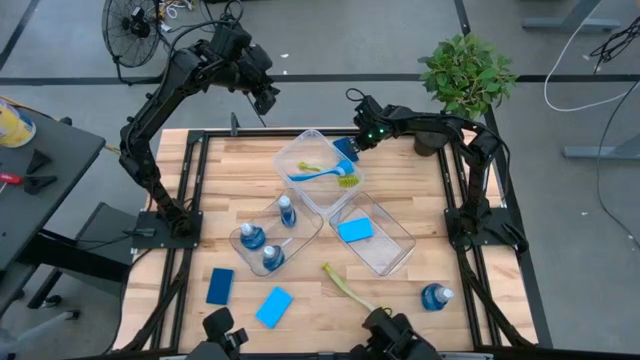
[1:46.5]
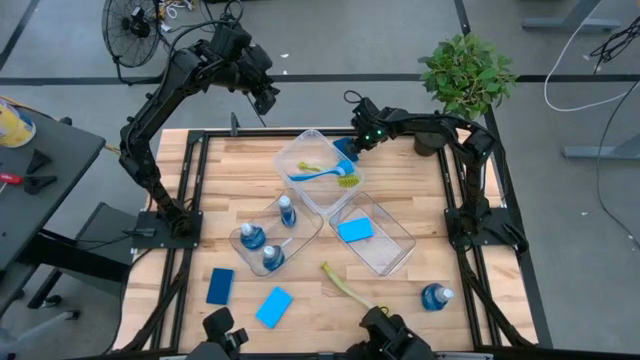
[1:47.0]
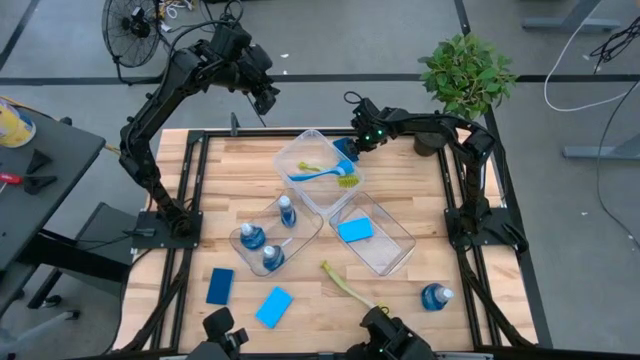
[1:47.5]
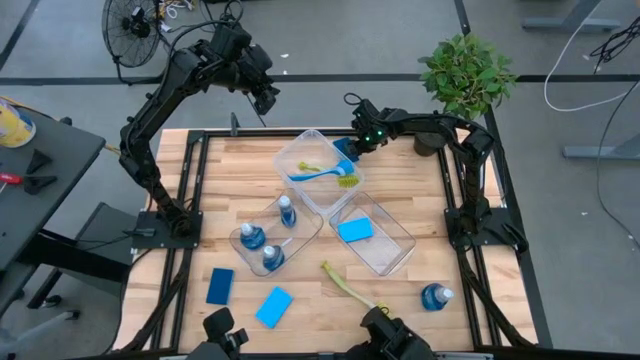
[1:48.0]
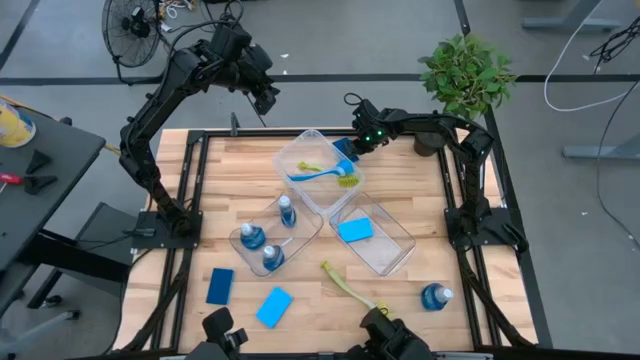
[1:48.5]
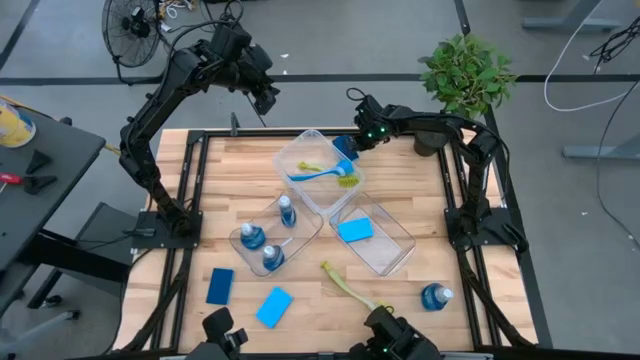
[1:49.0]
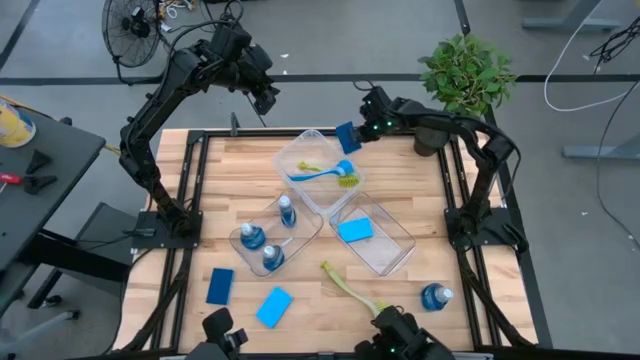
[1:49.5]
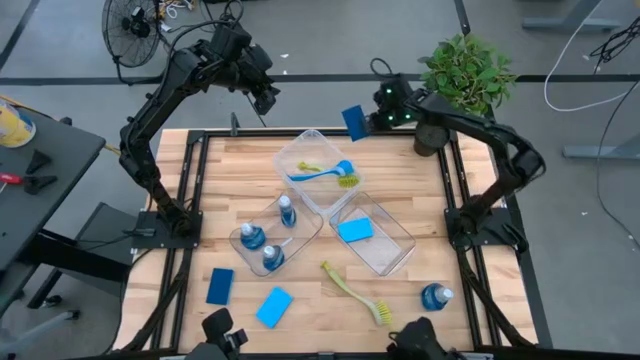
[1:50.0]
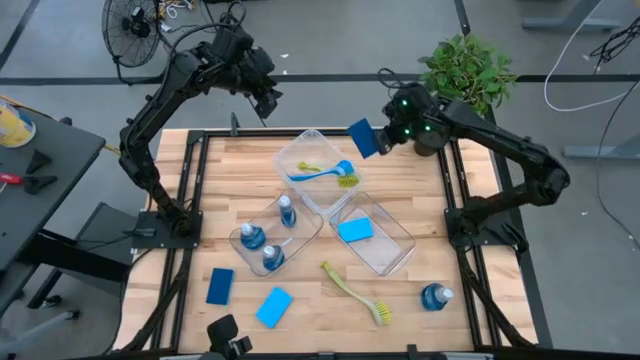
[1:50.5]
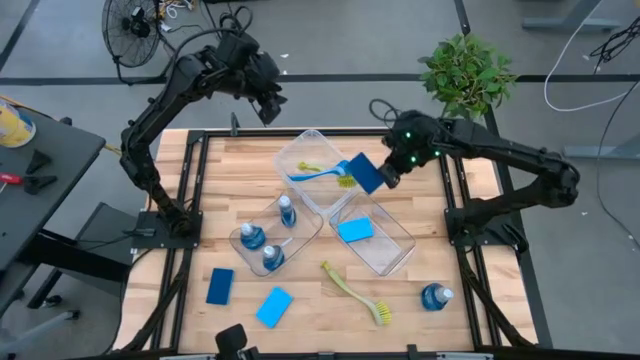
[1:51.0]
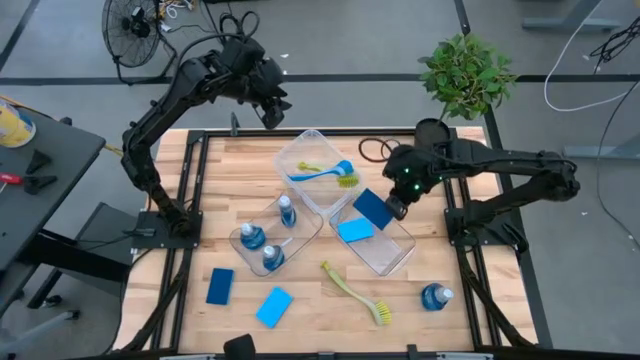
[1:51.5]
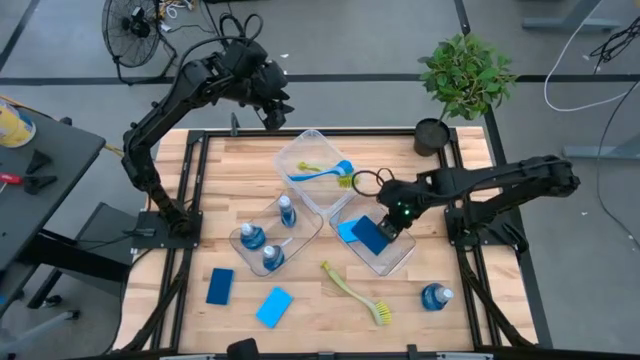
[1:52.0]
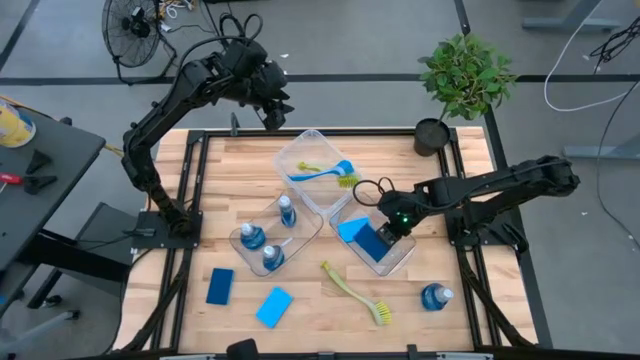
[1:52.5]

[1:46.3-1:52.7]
Task: Pick & Place Kitchen Sink Supplies
Put the blue sponge into the right transparent bin

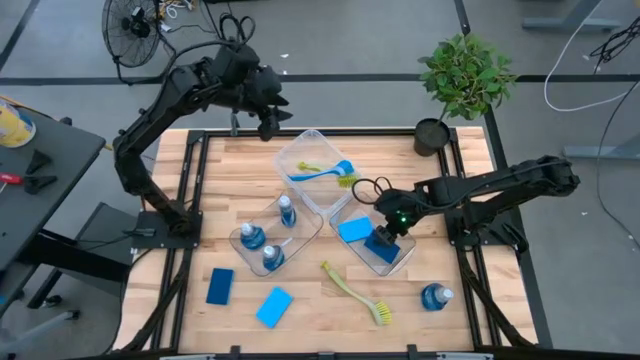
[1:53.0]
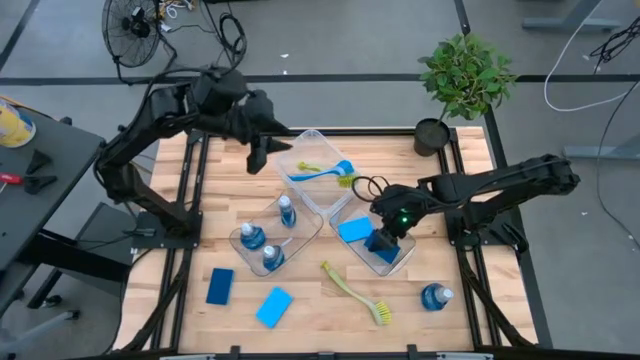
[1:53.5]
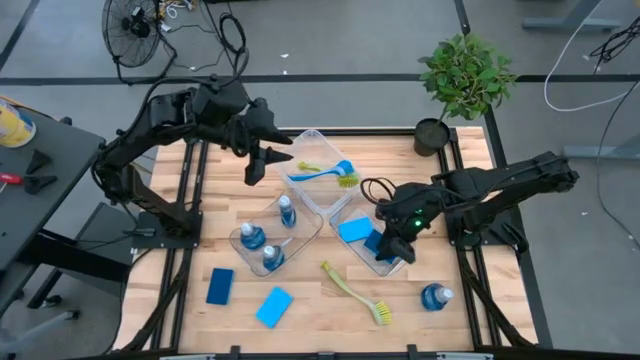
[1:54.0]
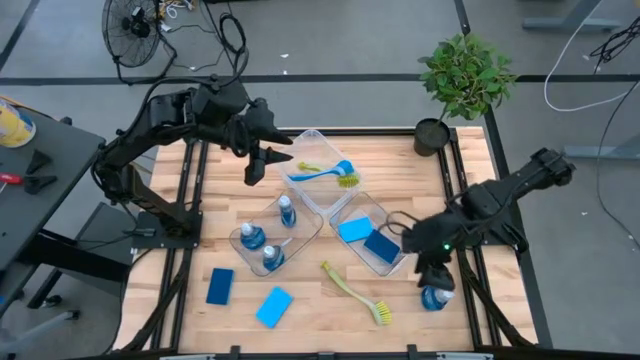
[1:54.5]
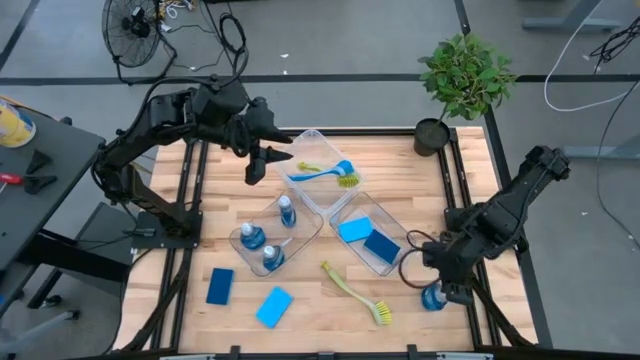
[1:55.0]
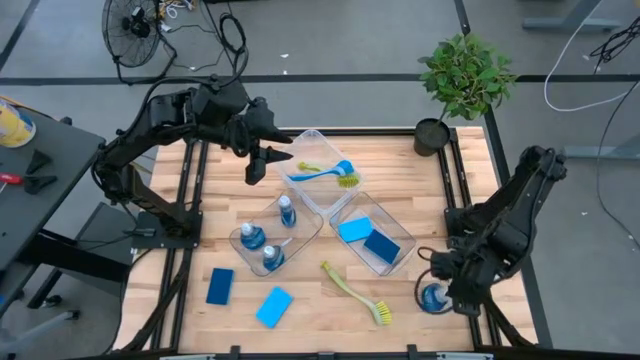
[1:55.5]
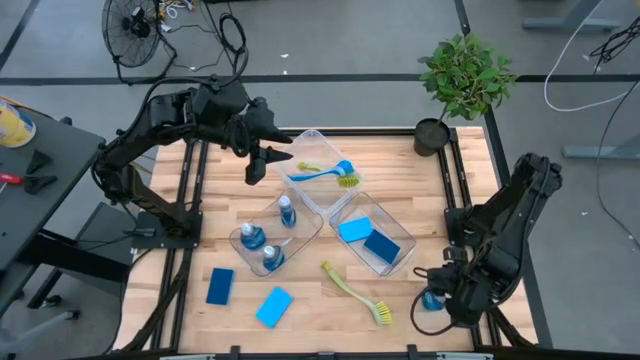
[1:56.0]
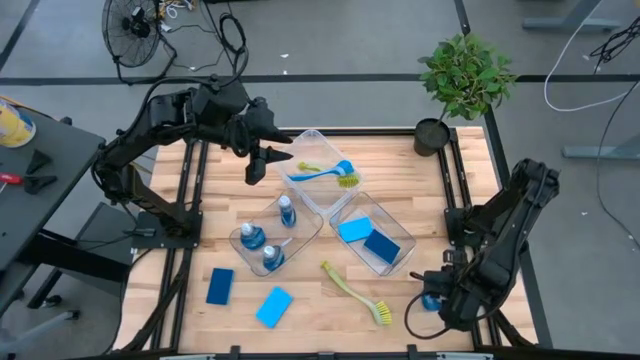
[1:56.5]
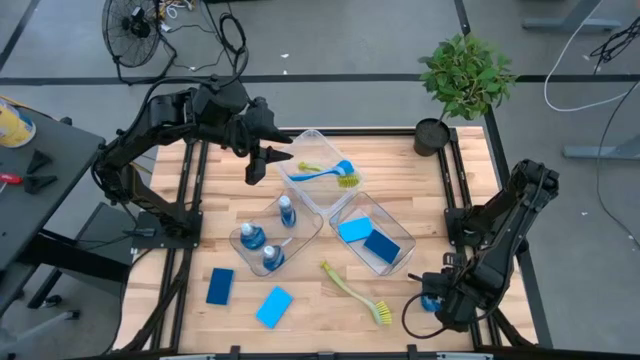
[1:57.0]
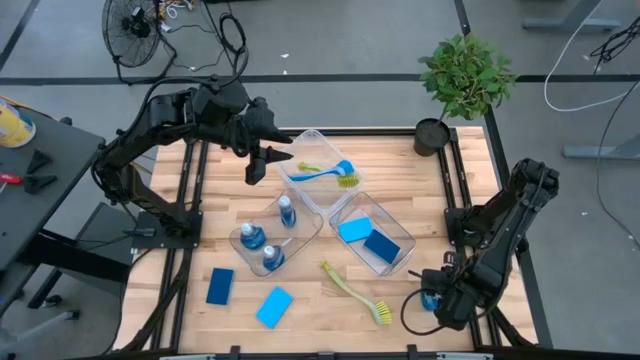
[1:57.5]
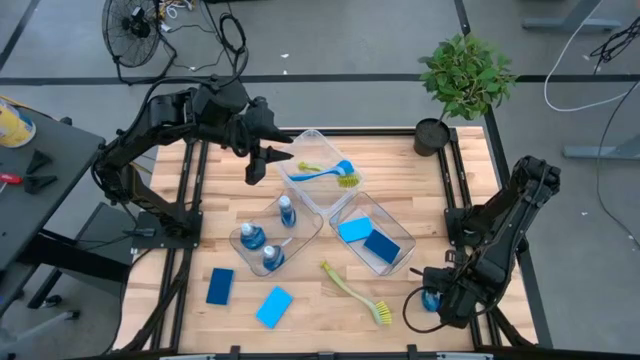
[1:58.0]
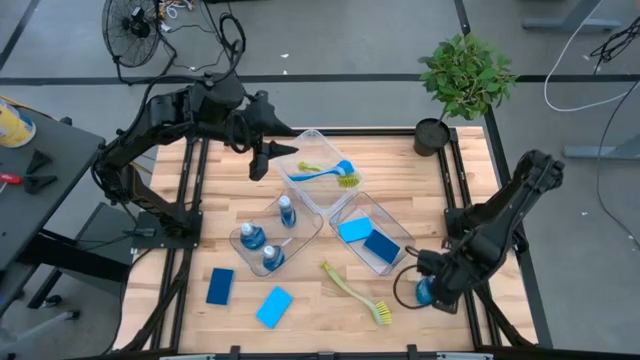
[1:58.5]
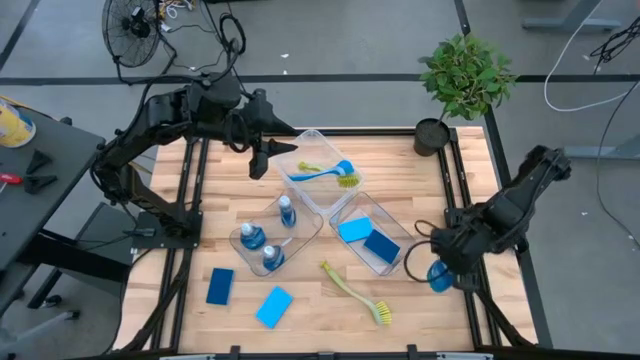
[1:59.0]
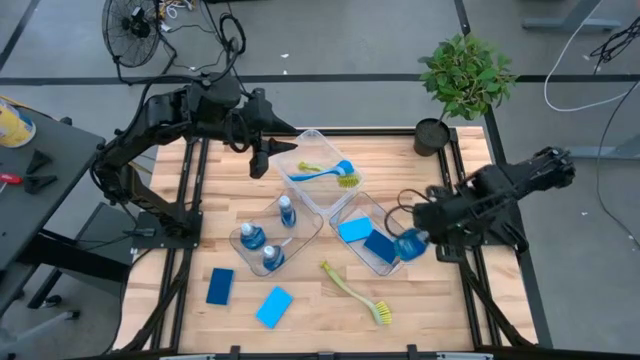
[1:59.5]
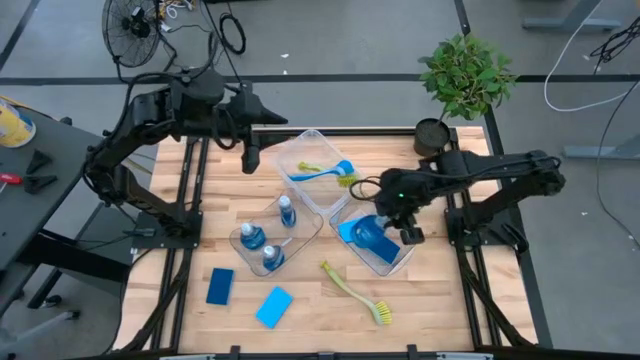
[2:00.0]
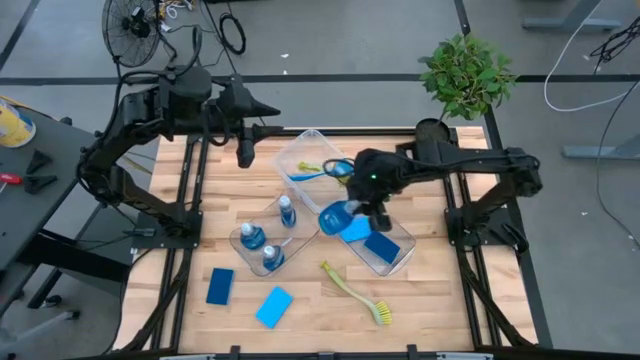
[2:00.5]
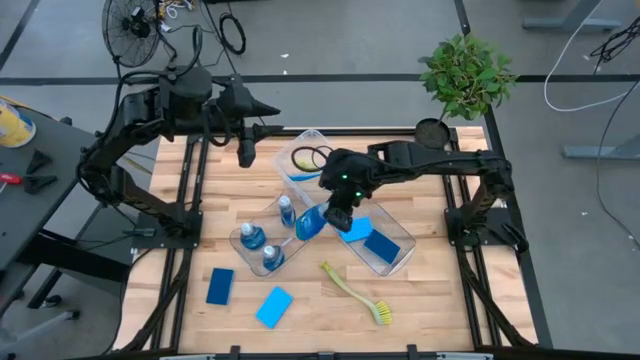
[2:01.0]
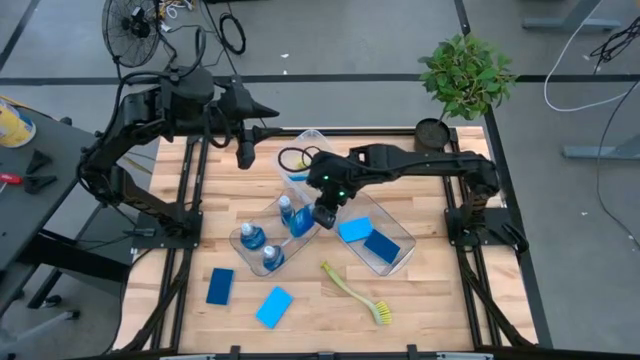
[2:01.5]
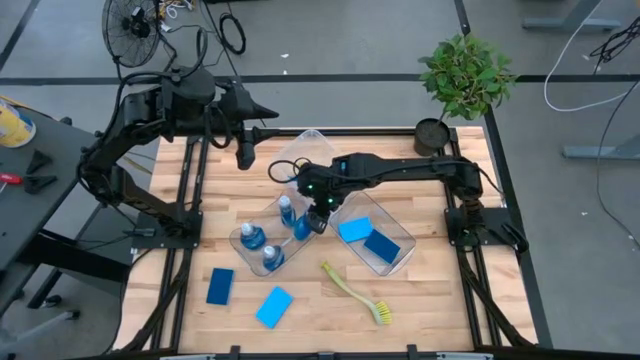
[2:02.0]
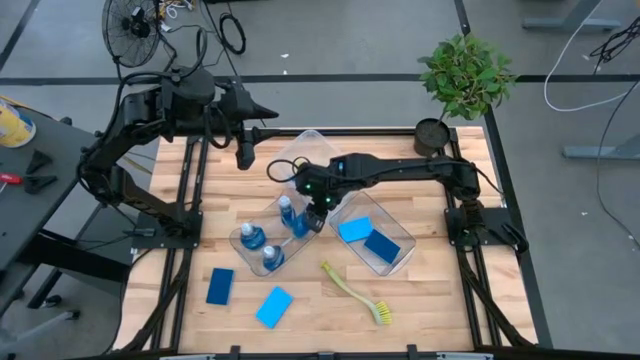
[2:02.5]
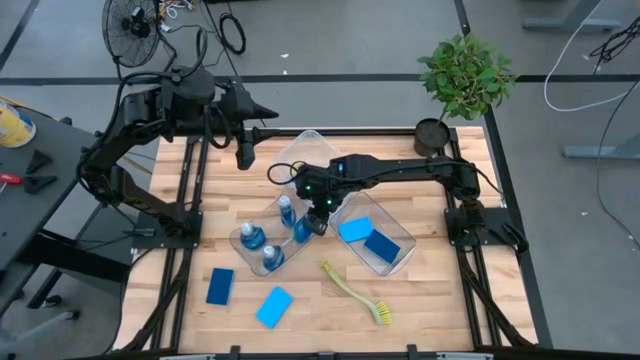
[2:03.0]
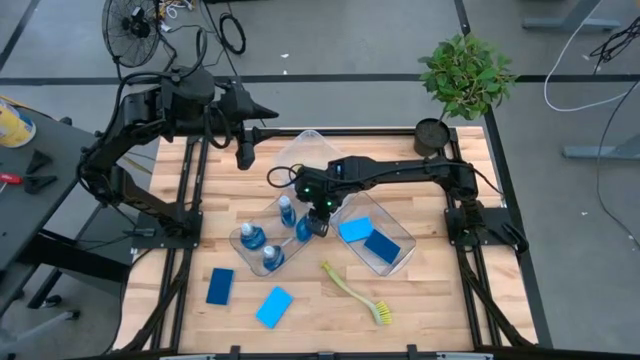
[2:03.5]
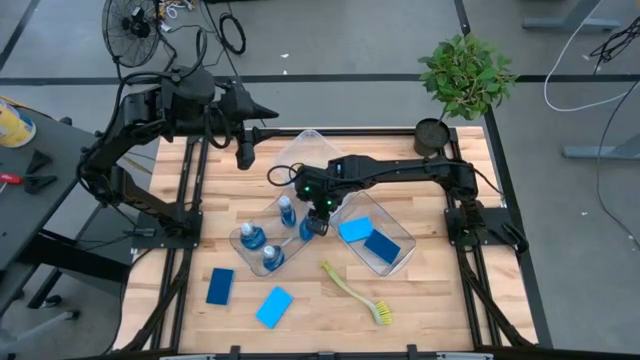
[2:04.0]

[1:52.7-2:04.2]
Put the blue dishwashing liquid into the left transparent bin

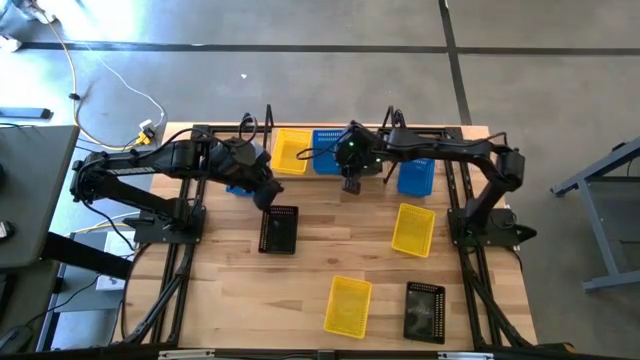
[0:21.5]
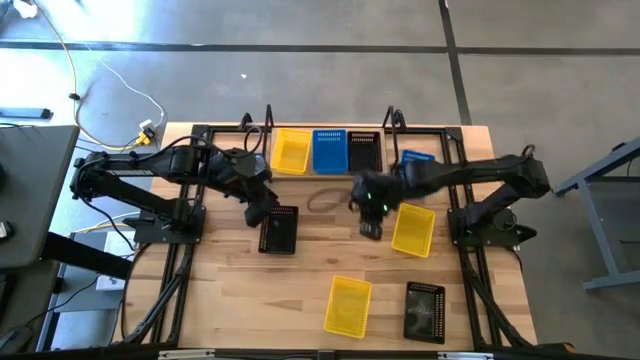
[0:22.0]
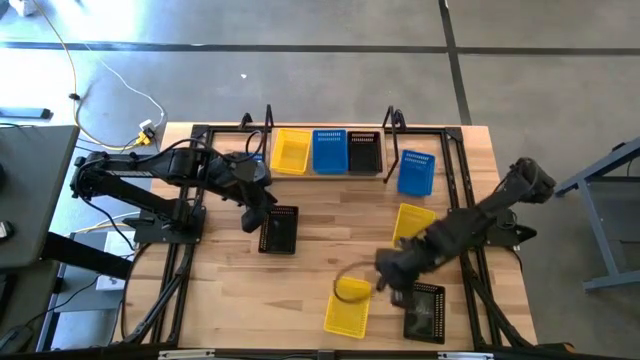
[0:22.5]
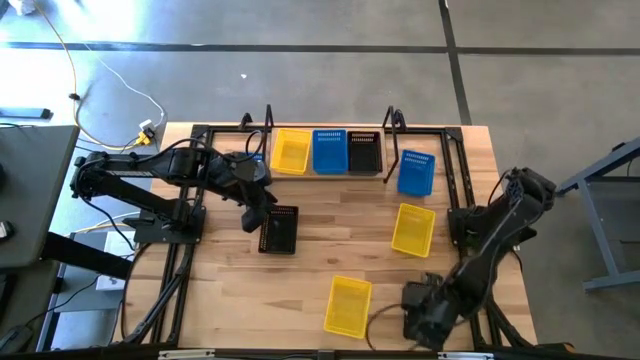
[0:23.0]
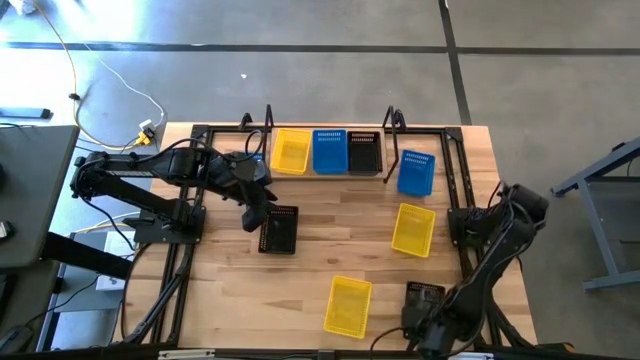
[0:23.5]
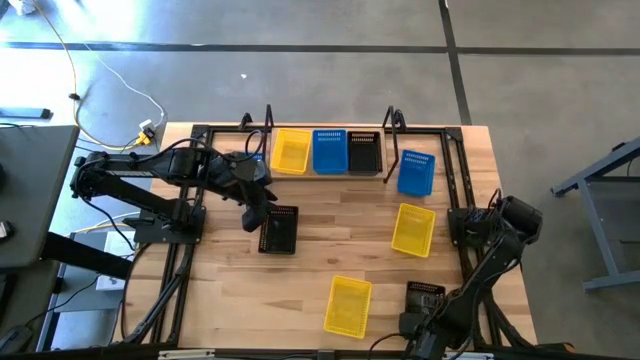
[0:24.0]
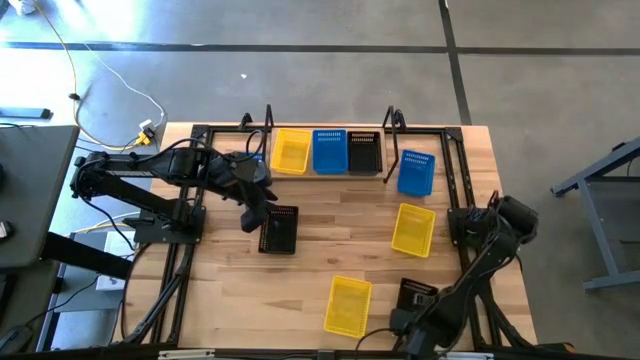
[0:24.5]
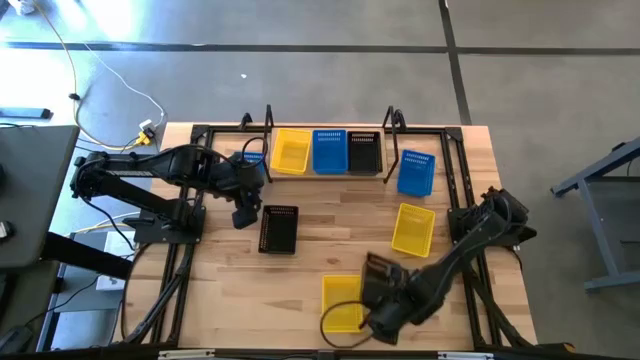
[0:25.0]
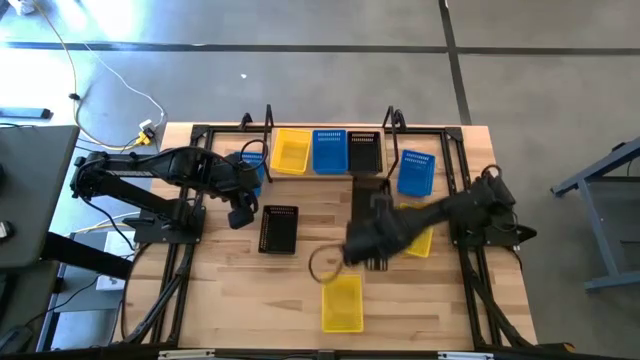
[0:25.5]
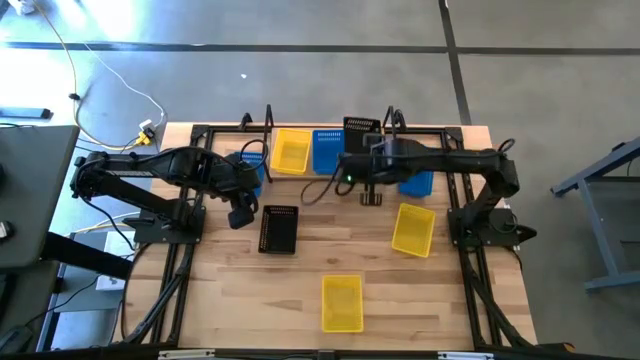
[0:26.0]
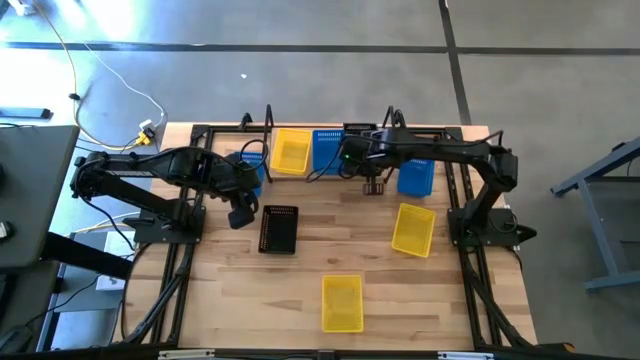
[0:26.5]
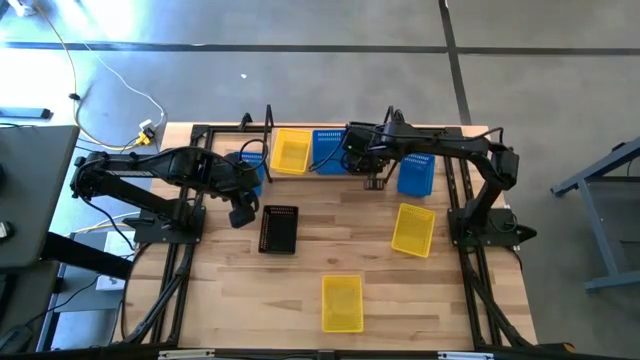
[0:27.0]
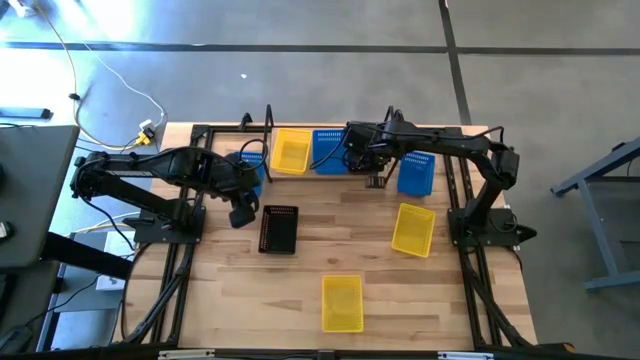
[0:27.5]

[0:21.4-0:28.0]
Task: Stack baskets on shelf by color
Stack the bottom black basket on the black basket on the shelf
